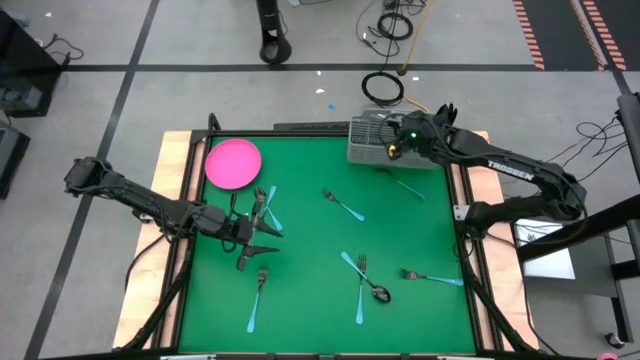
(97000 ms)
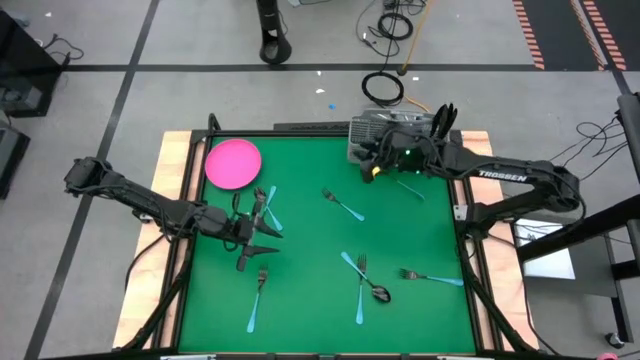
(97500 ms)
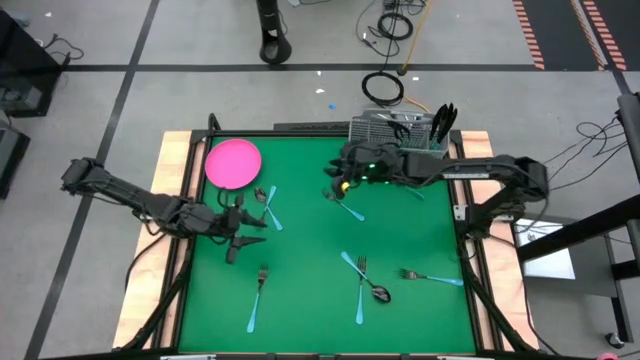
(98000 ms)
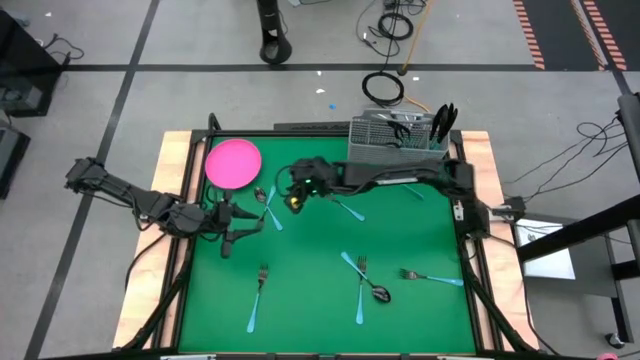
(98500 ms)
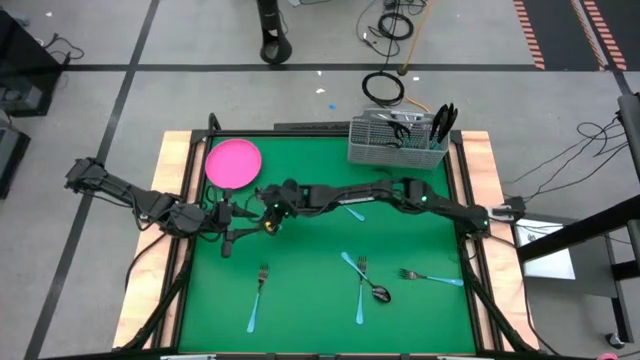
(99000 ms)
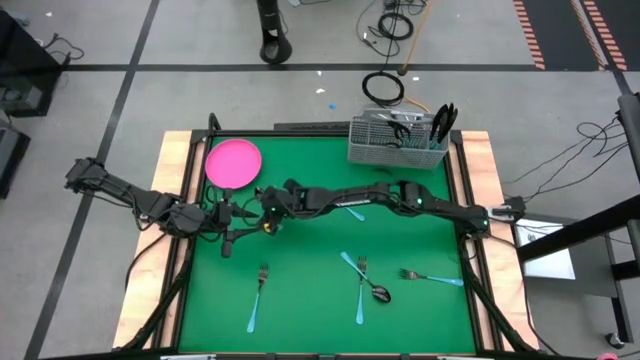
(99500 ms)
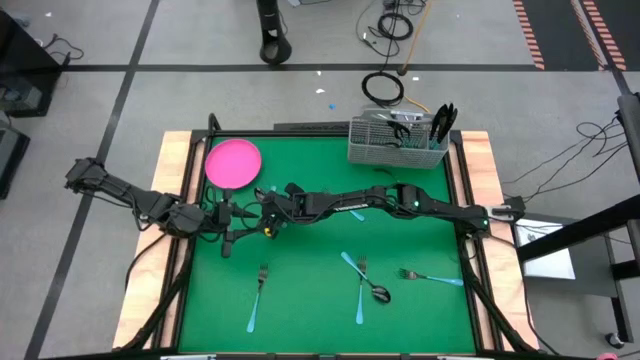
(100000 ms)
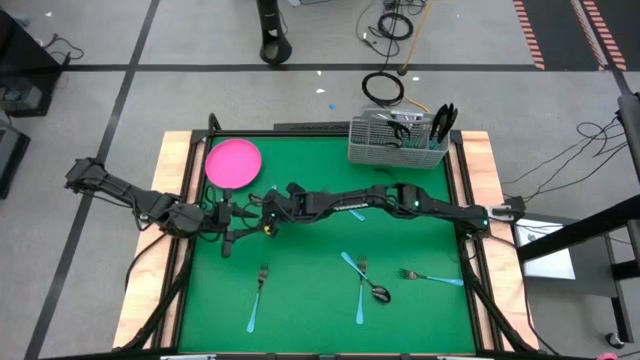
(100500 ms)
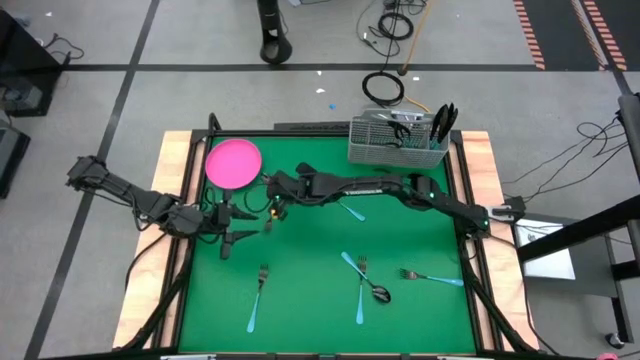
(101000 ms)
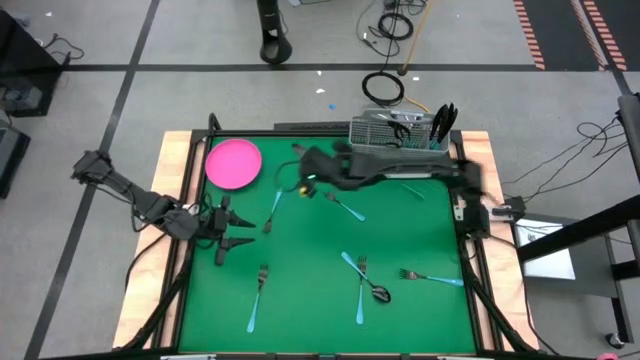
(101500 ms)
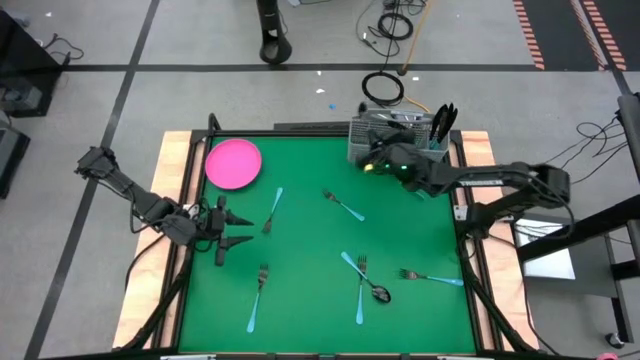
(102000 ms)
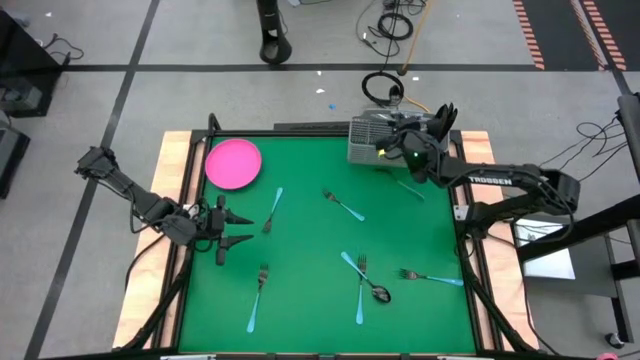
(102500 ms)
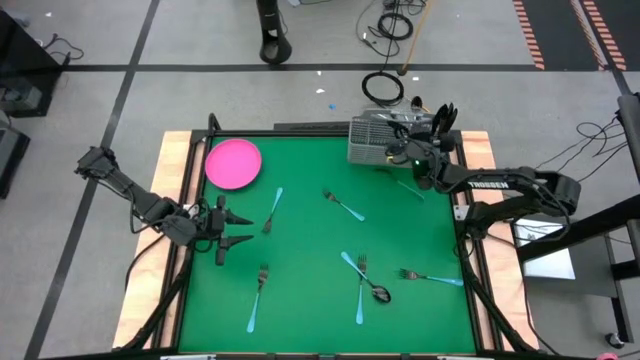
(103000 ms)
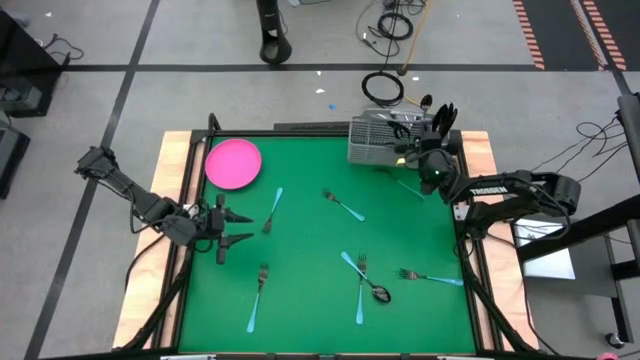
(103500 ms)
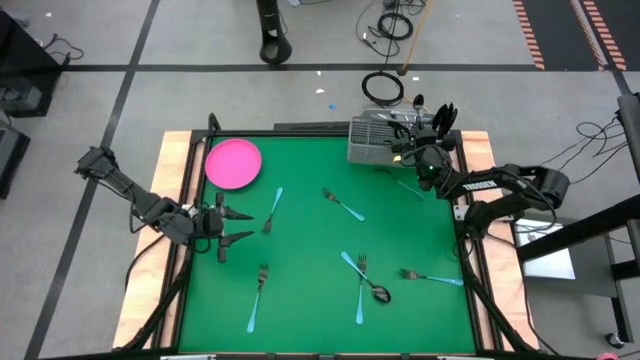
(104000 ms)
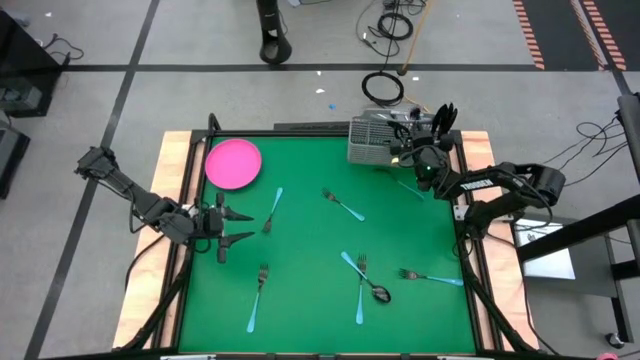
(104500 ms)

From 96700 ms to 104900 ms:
Task: Sort silverware
Put the blue spoon into the gray silverware basket

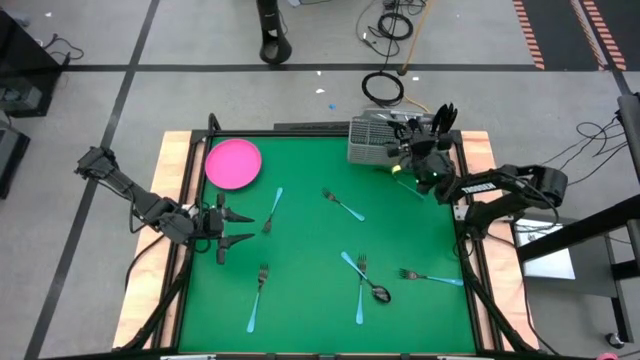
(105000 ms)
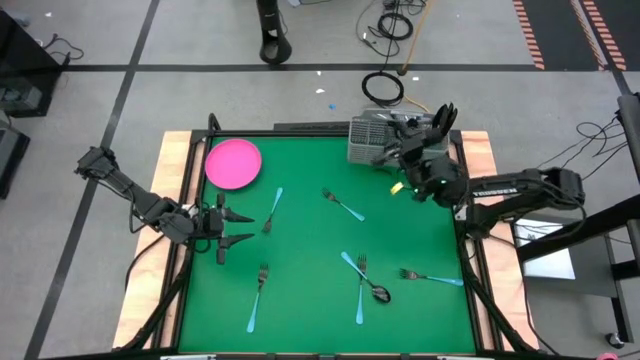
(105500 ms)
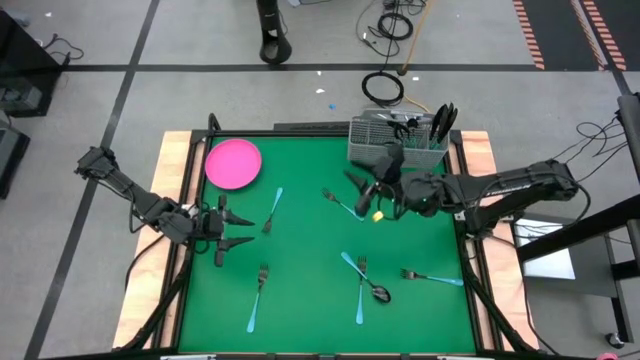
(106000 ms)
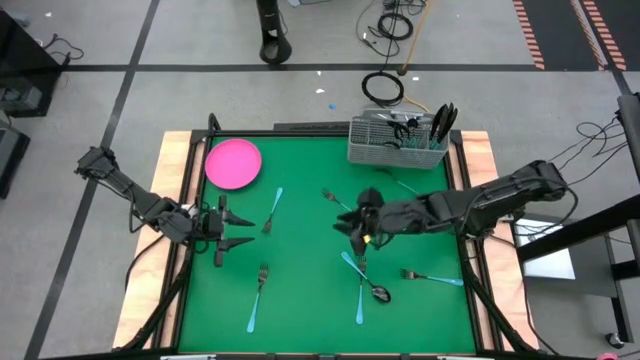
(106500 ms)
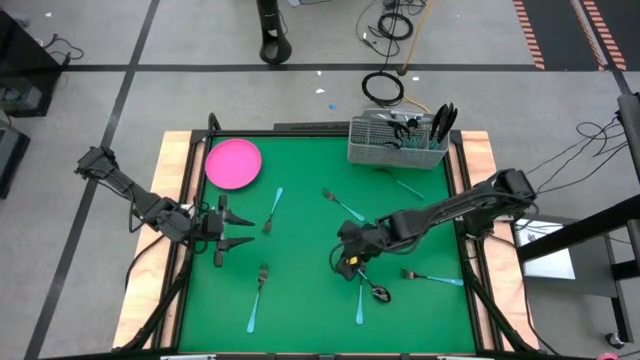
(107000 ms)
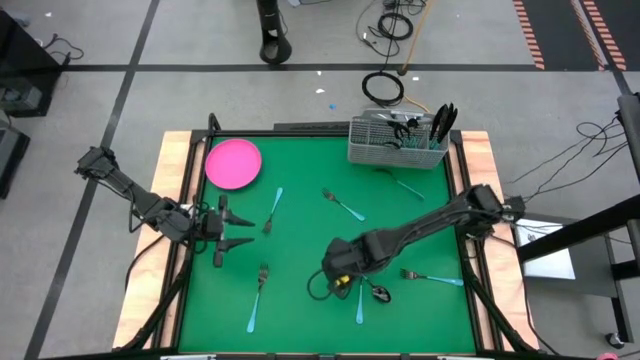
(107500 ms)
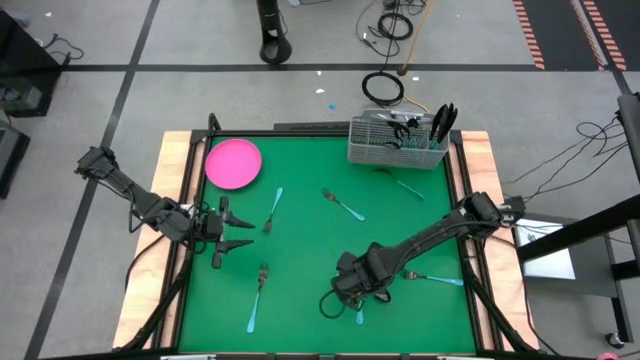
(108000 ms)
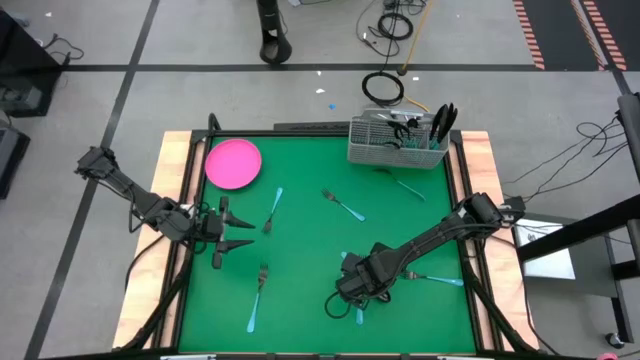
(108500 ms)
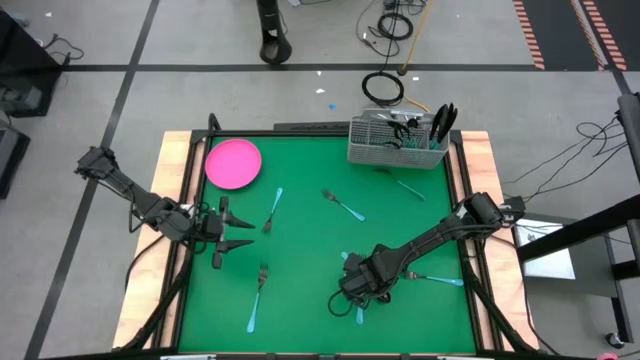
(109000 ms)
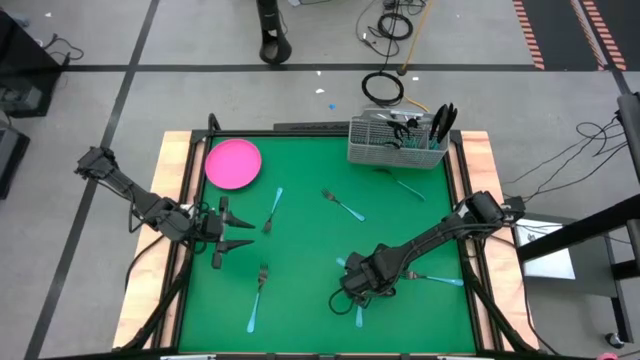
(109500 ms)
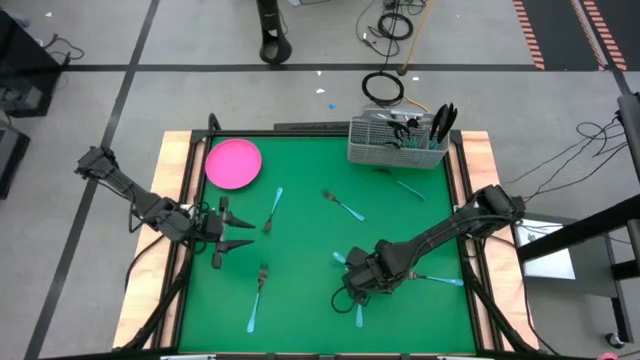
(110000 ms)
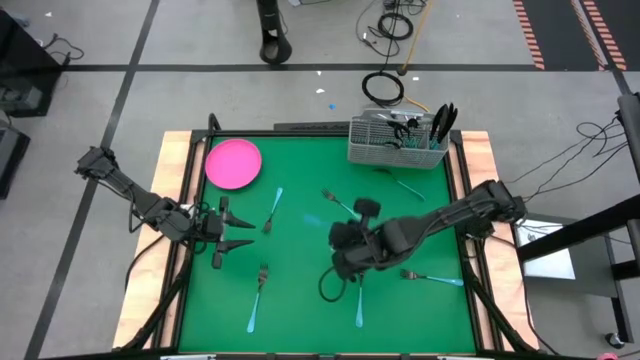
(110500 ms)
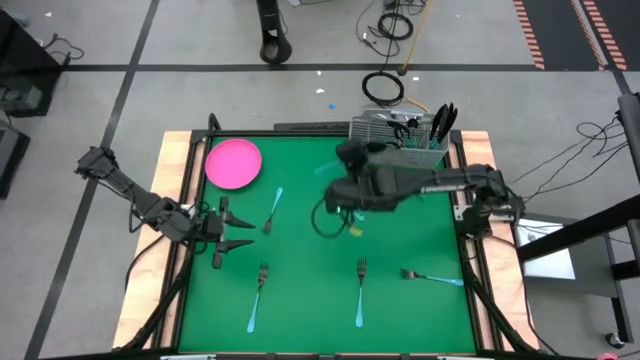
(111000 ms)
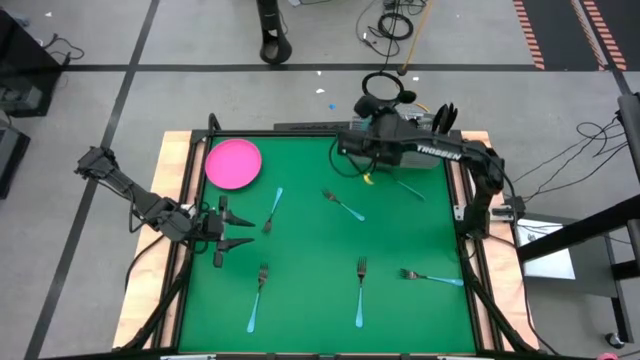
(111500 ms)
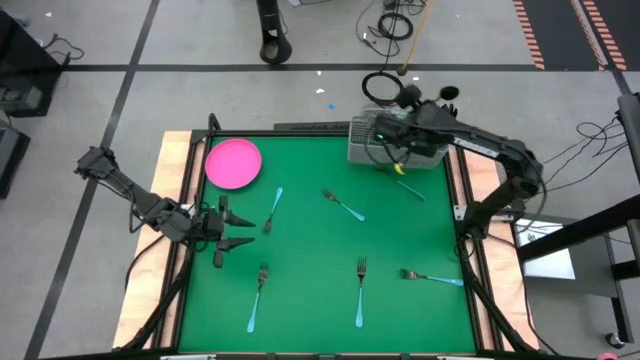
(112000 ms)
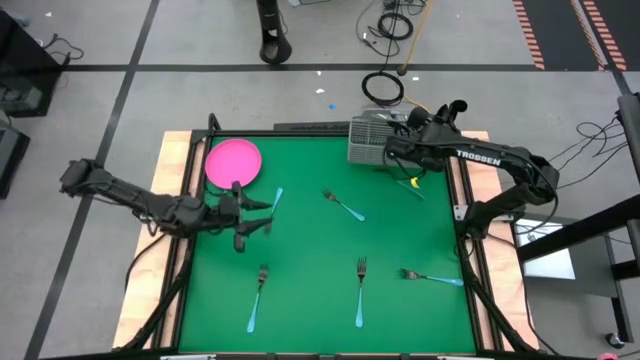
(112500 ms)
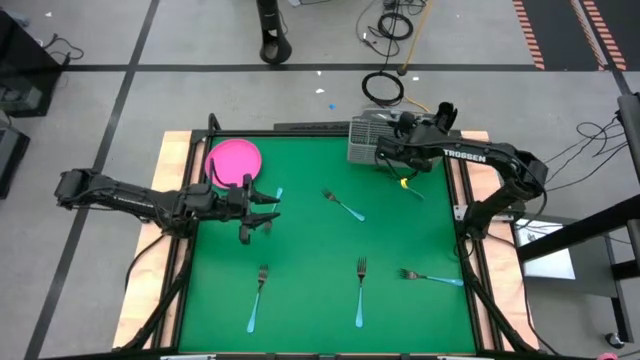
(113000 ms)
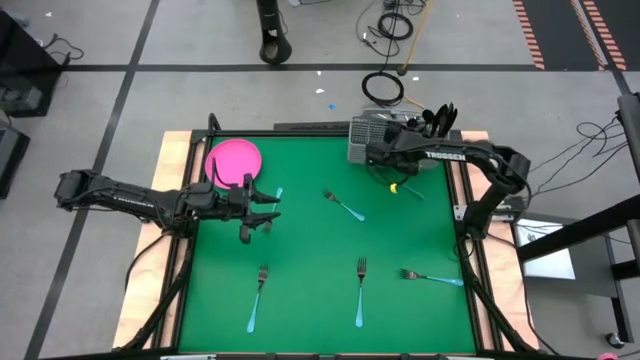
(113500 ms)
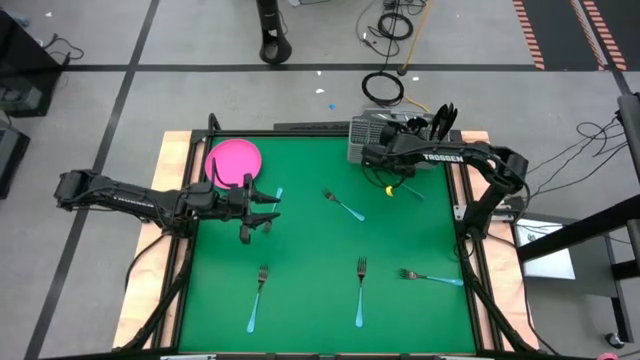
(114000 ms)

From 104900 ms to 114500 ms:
Put the blue spoon into the gray silverware basket

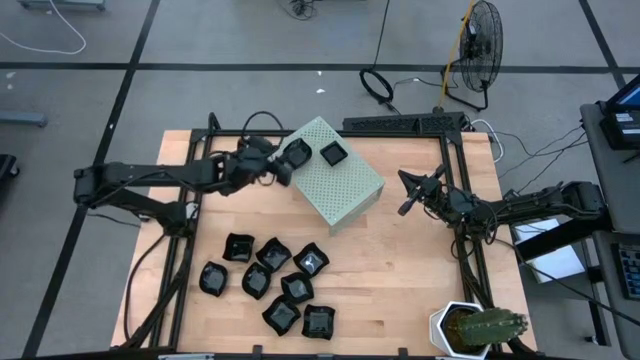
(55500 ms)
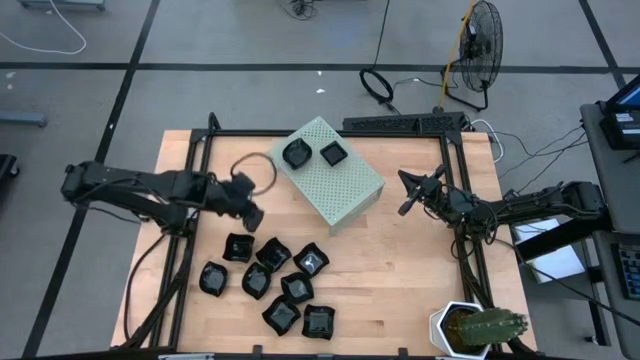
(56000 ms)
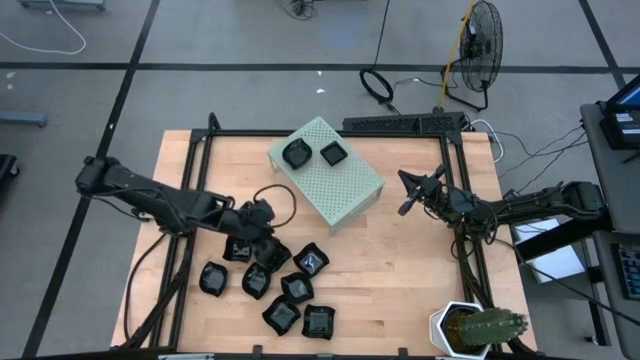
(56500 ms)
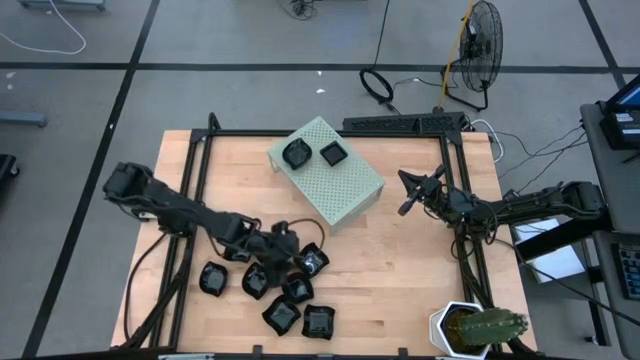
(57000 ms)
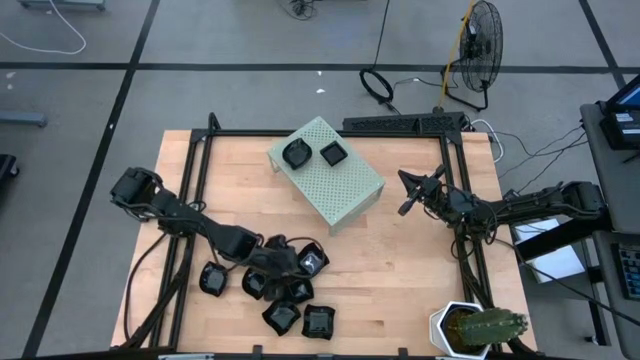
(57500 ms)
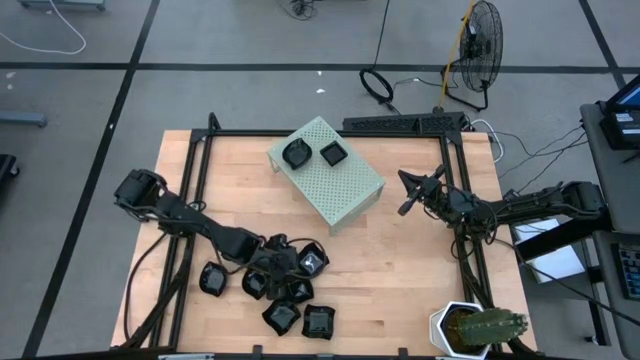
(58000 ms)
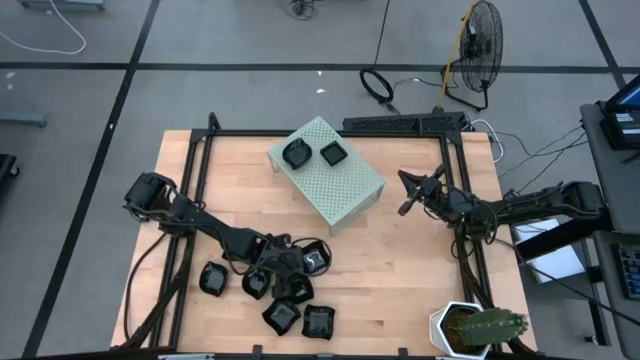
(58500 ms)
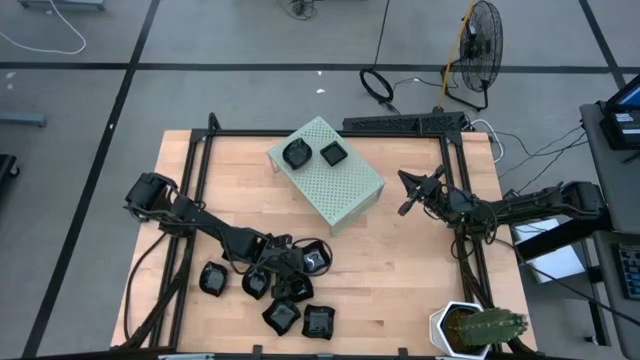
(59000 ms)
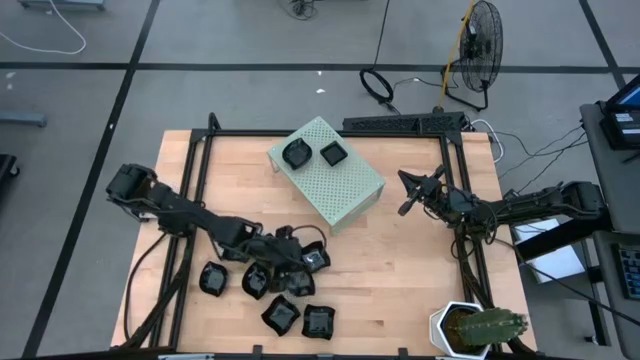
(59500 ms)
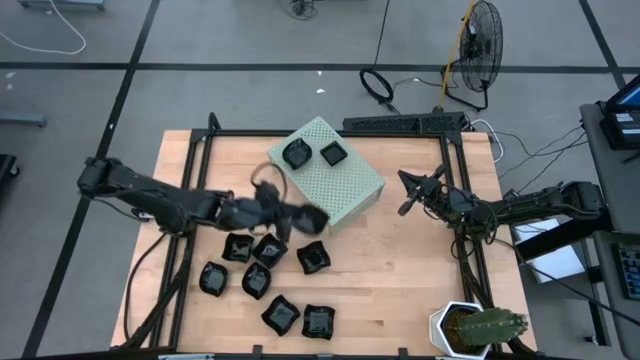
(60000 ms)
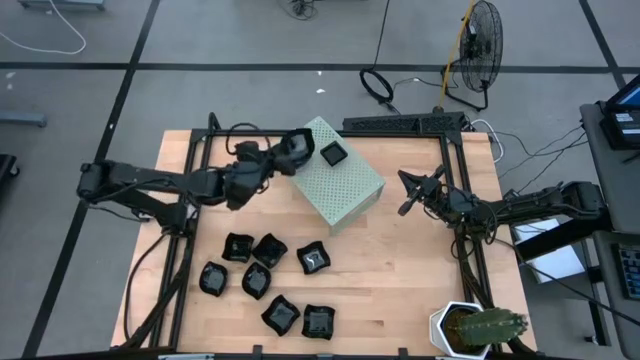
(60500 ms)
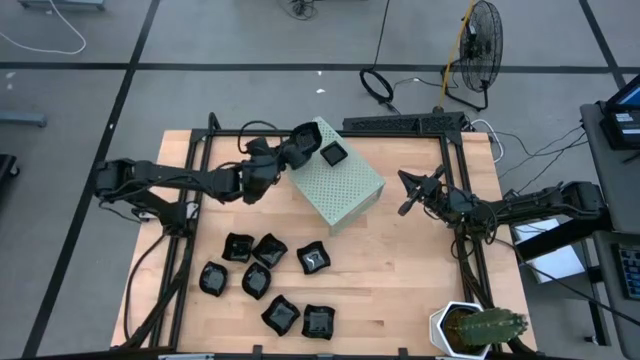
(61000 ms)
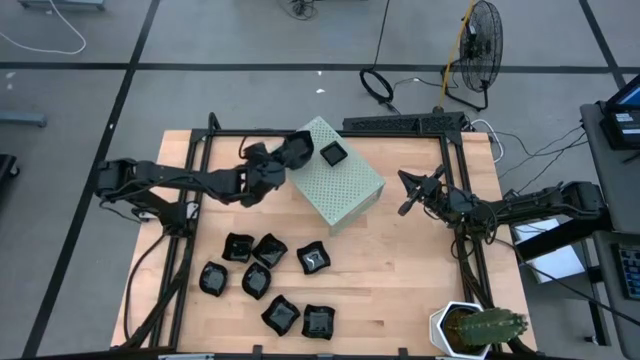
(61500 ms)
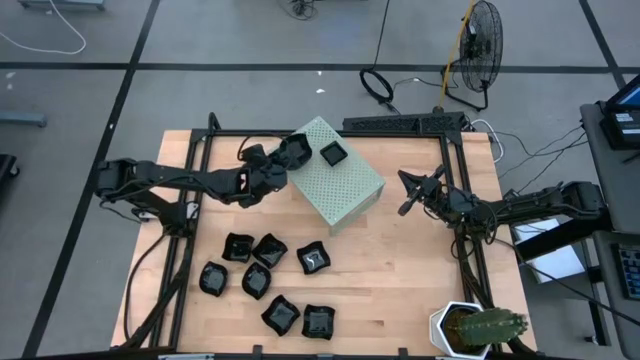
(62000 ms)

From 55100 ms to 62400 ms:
Task: Pick & Place Mini shaped plates
Stack the leaf-shaped plate on top of the other leaf-shaped plate on the shelf
